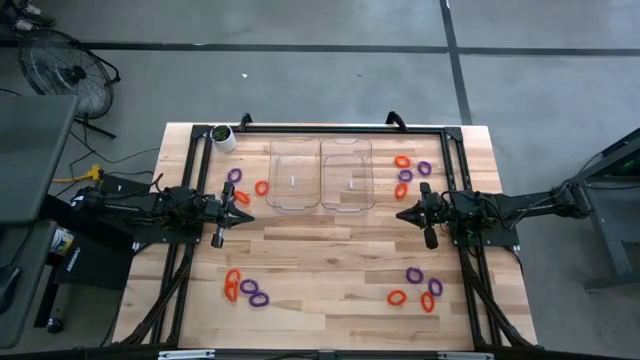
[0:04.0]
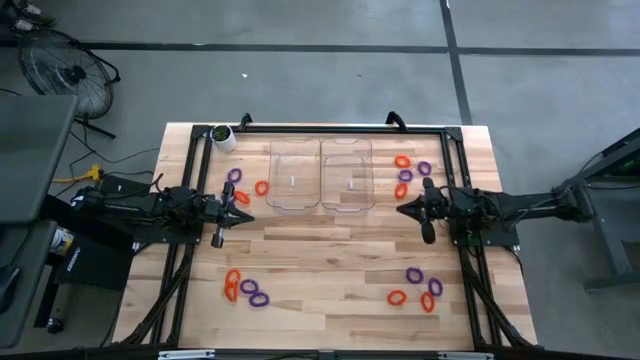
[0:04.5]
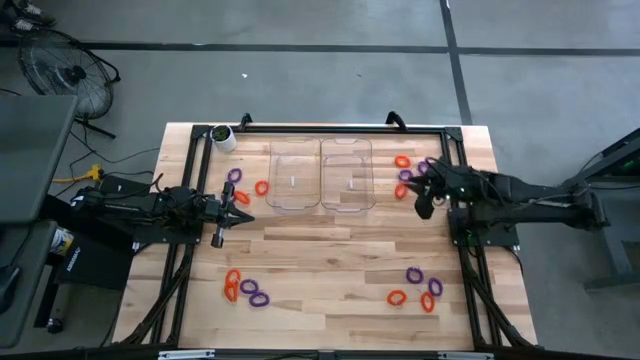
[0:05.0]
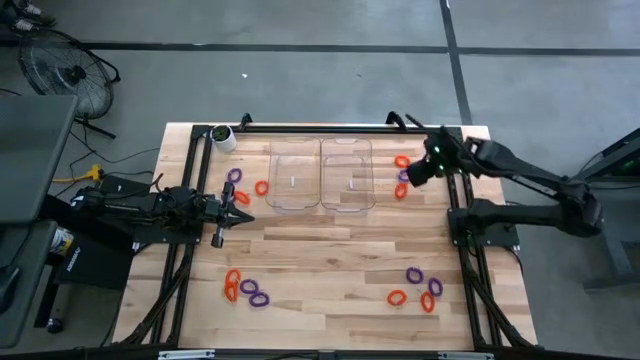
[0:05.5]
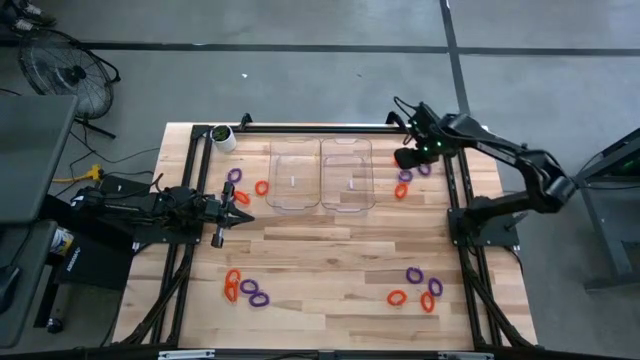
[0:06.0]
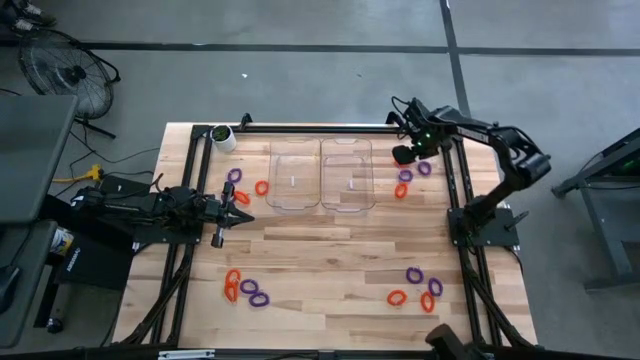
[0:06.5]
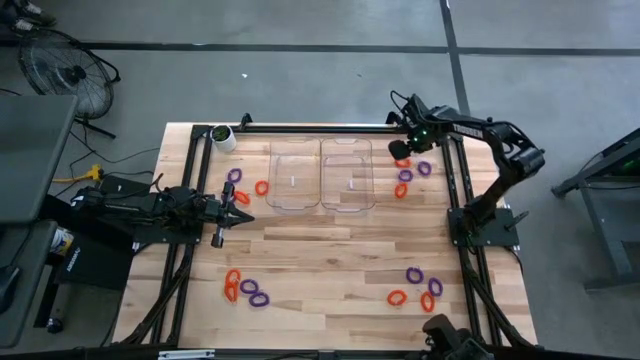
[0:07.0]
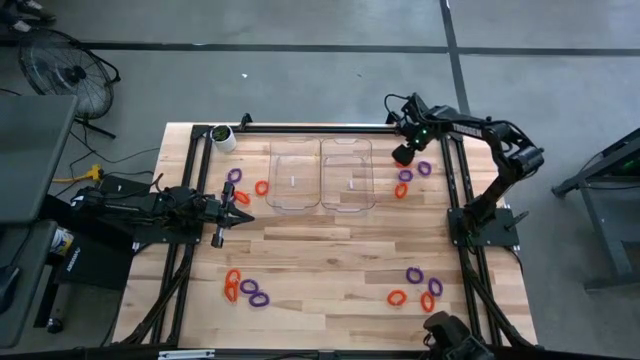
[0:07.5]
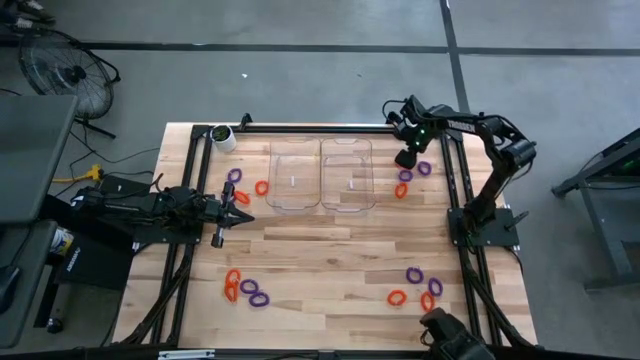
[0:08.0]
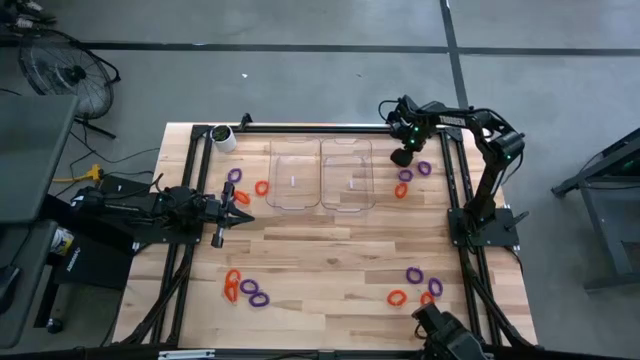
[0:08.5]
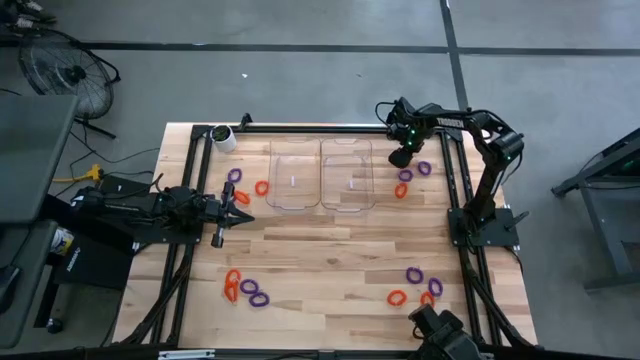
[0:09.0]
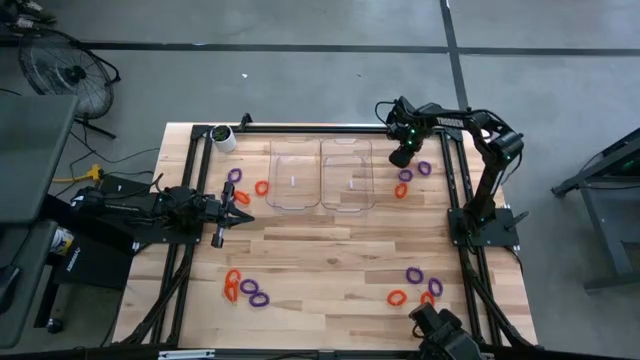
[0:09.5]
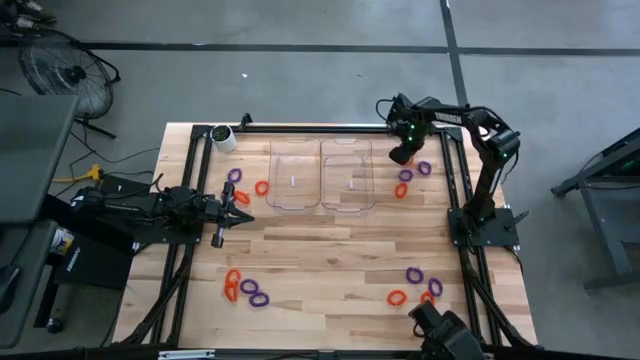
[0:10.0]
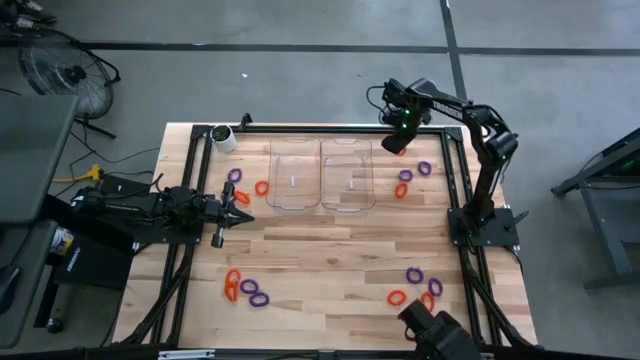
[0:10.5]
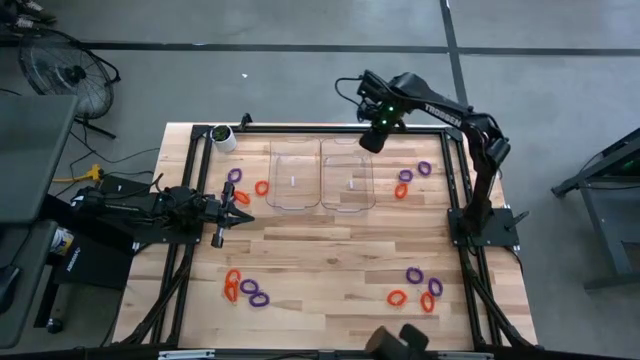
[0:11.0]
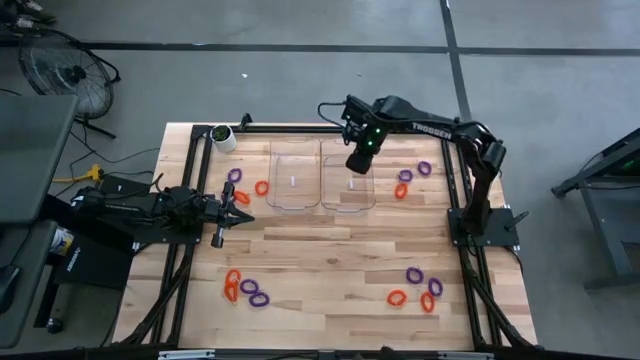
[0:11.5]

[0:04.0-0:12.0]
Task: Sort spring keychains
Put the orange spring keychain into the right transparent bin

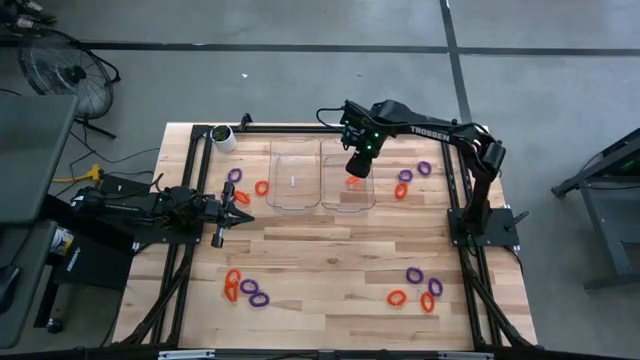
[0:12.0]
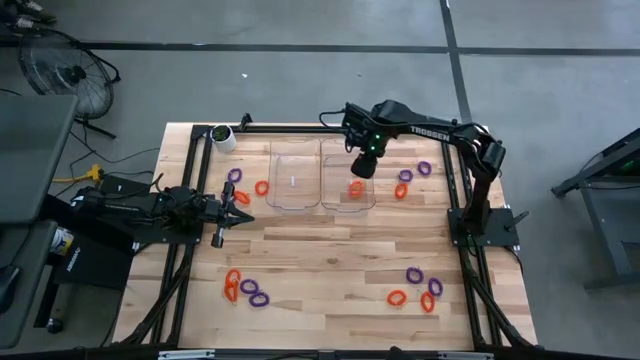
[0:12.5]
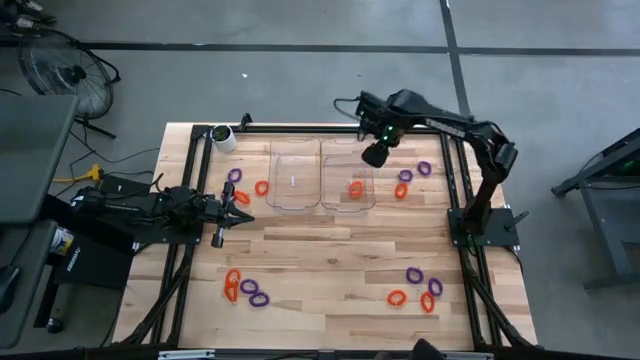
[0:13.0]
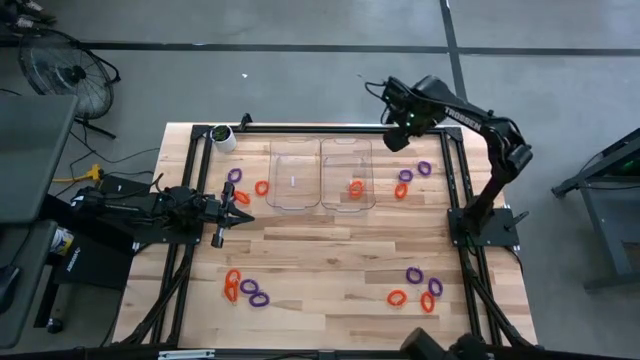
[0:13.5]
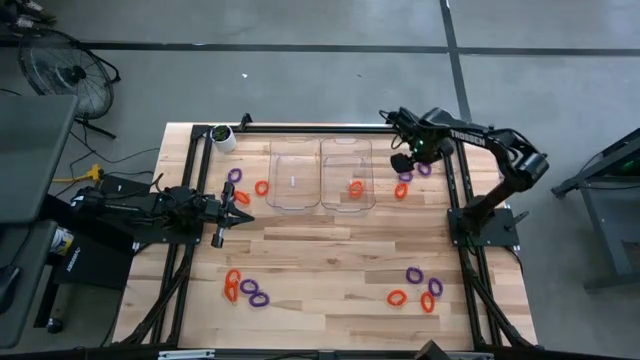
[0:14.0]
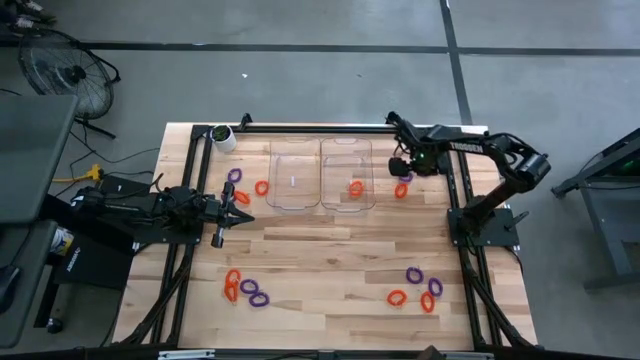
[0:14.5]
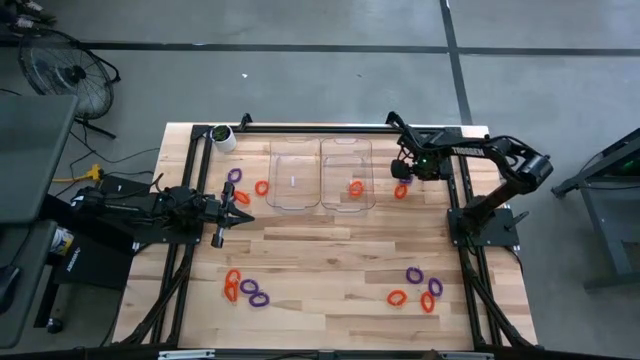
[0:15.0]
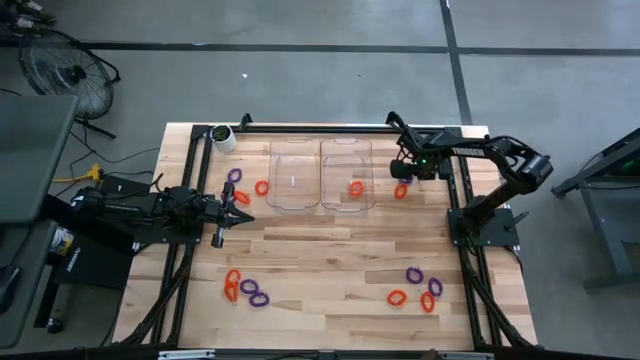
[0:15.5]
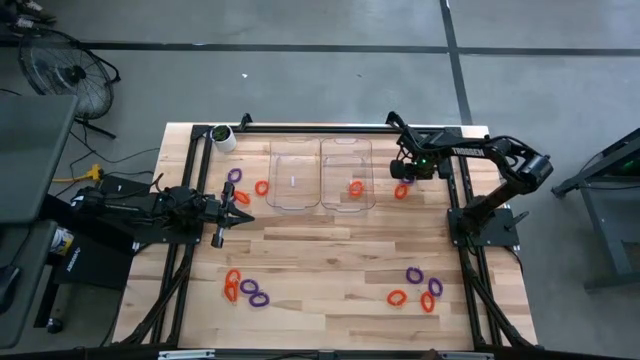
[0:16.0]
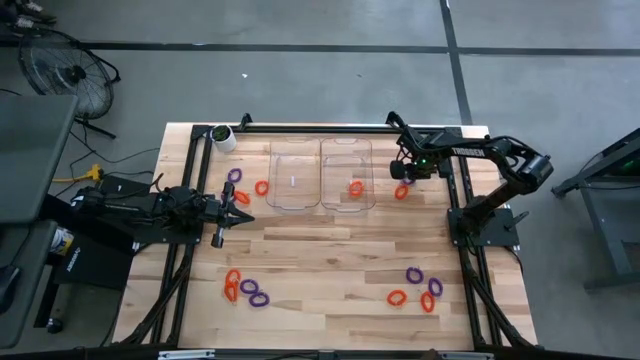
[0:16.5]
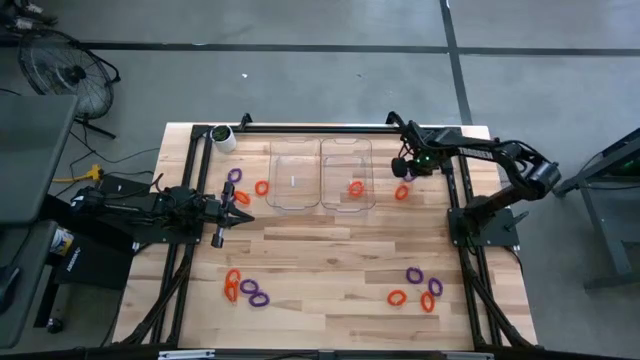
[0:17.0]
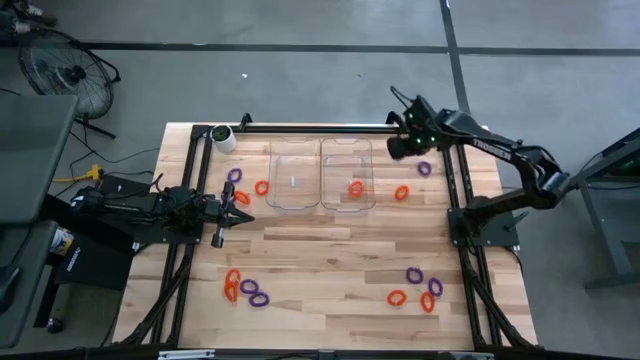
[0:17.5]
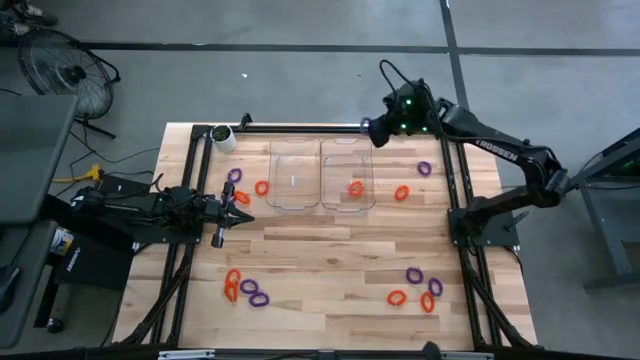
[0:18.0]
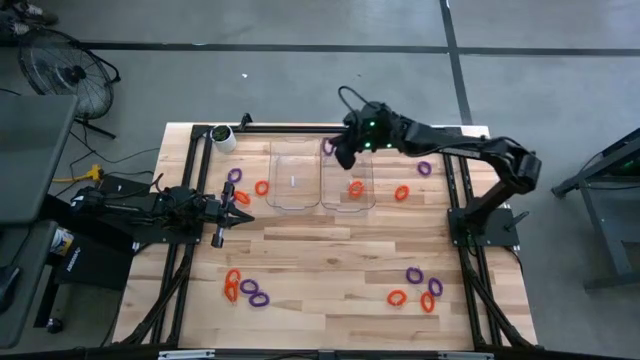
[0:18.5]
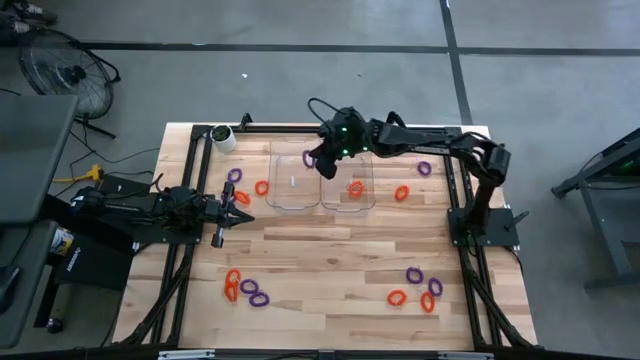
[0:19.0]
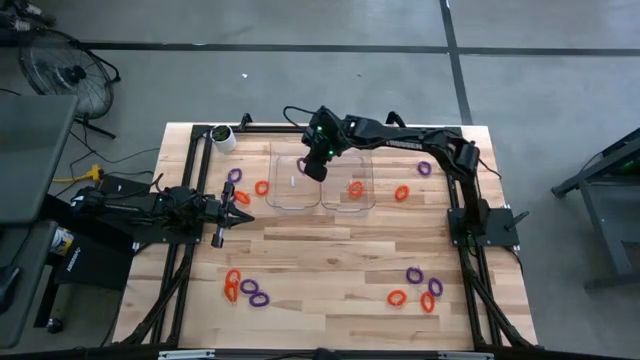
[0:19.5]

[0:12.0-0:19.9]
Put the purple spring keychain into the left transparent bin

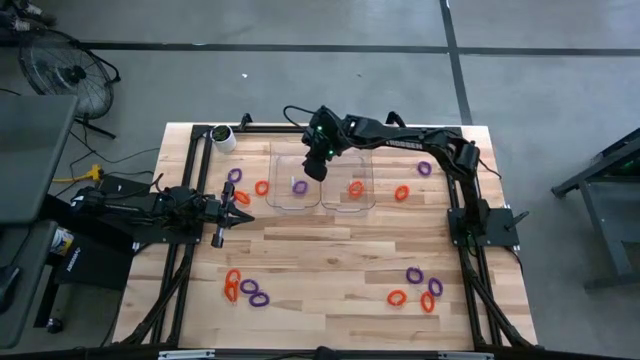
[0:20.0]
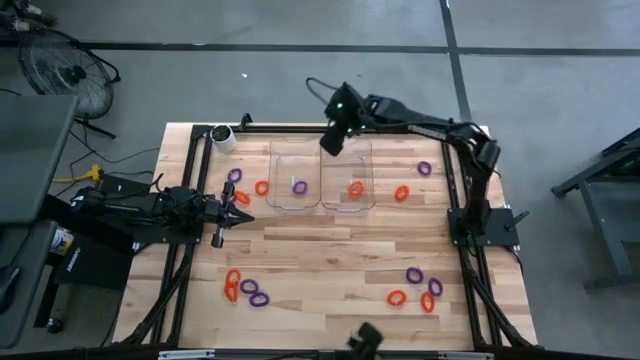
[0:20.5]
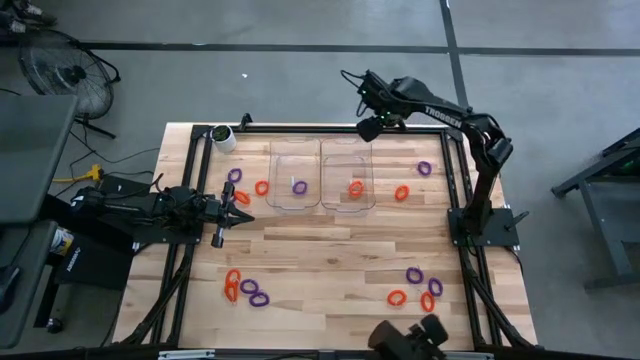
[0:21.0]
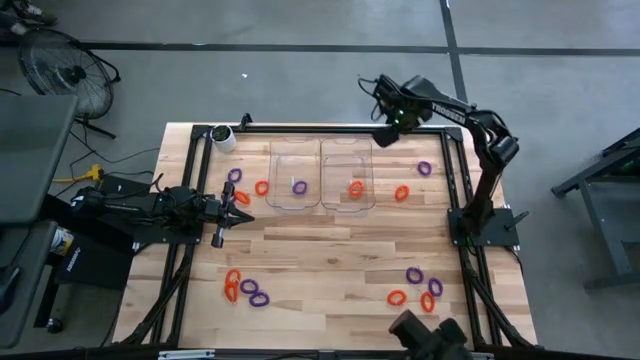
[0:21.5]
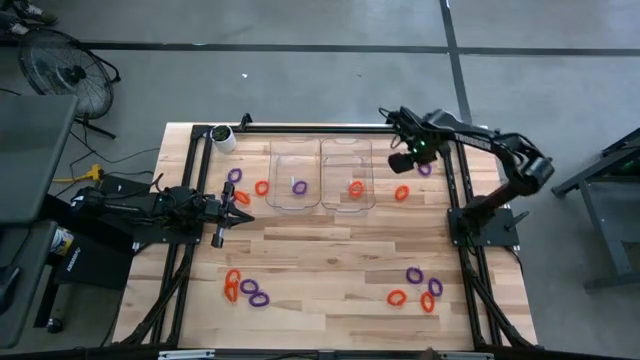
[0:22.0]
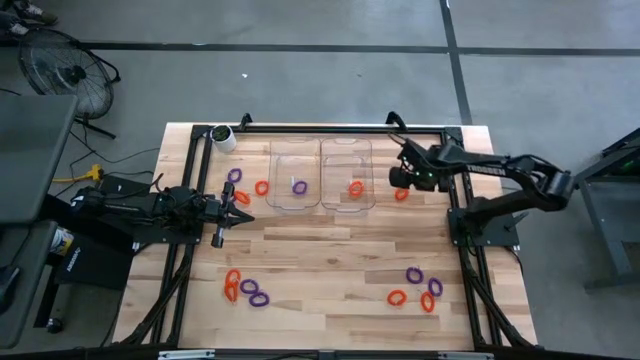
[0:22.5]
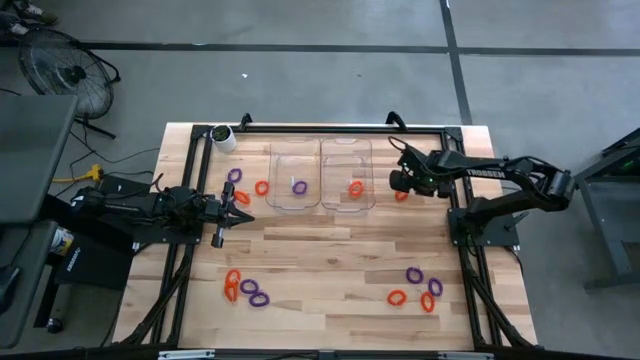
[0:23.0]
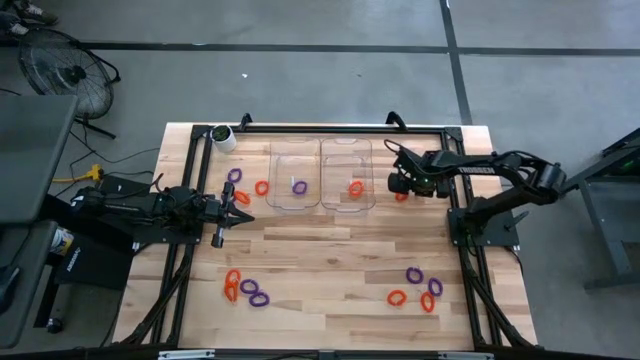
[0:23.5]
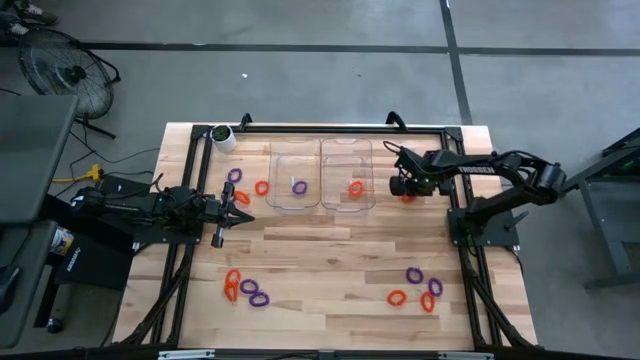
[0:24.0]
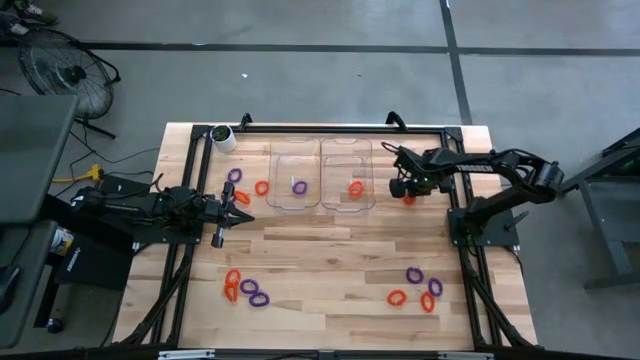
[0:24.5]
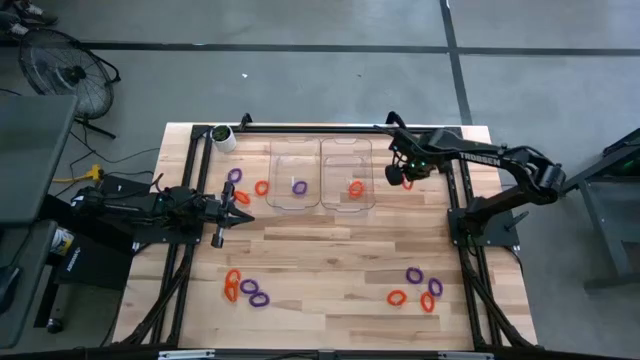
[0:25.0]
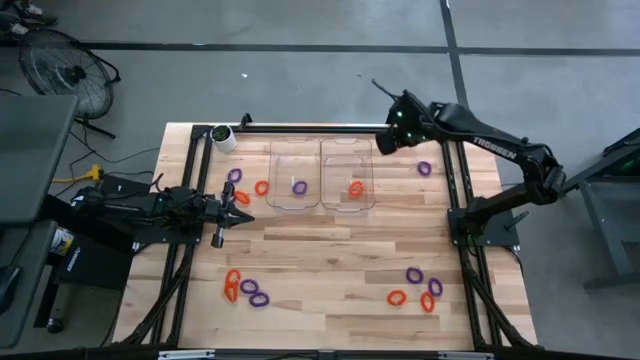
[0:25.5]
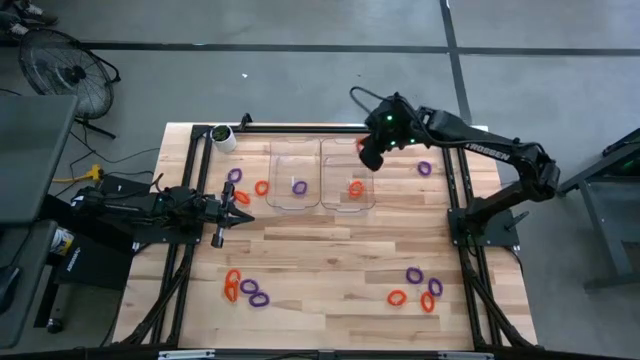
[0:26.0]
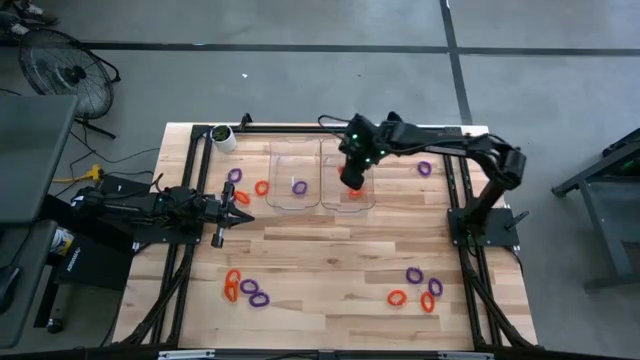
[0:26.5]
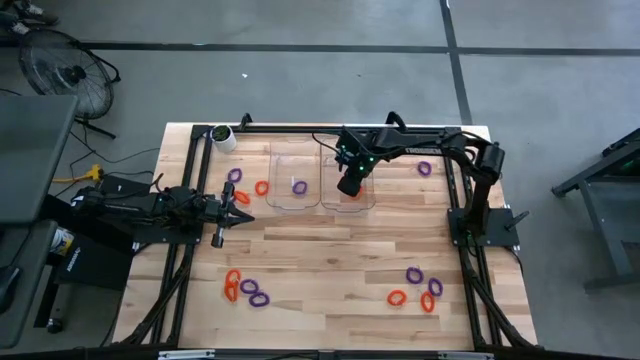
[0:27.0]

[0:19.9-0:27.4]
Put the orange spring keychain into the right transparent bin
